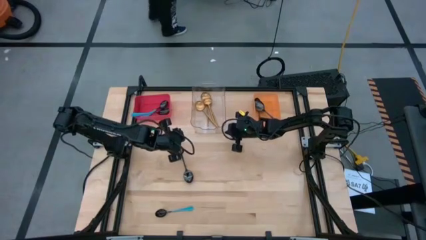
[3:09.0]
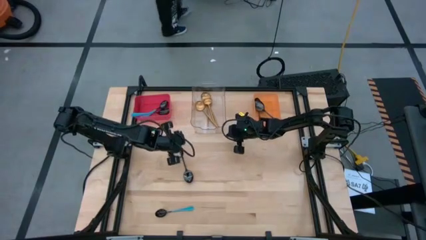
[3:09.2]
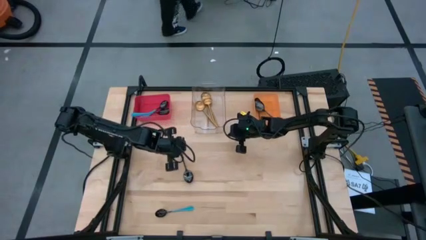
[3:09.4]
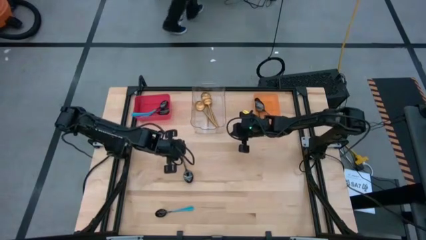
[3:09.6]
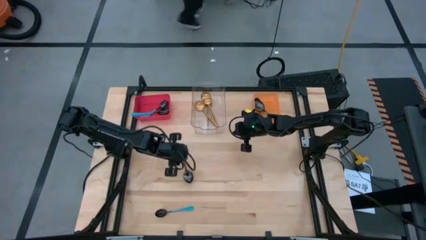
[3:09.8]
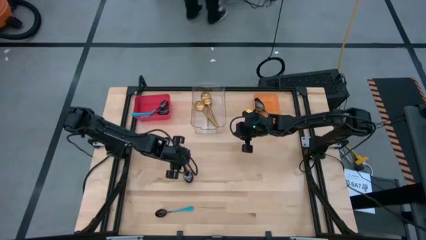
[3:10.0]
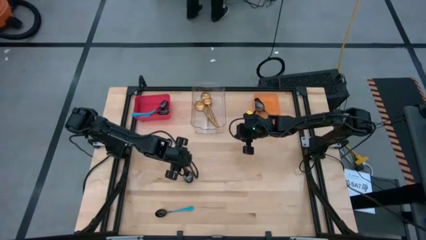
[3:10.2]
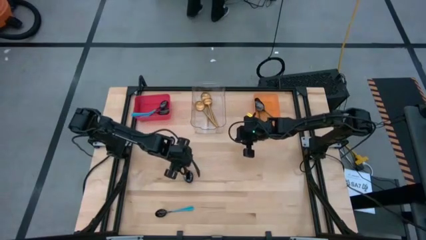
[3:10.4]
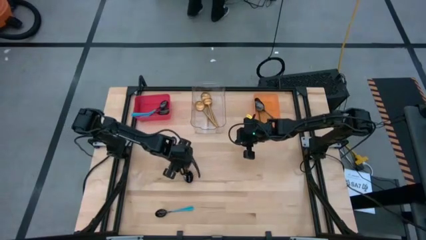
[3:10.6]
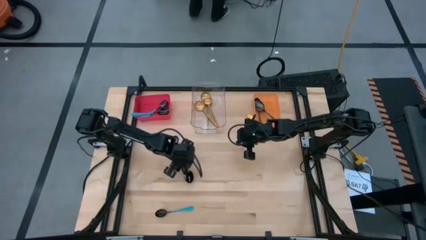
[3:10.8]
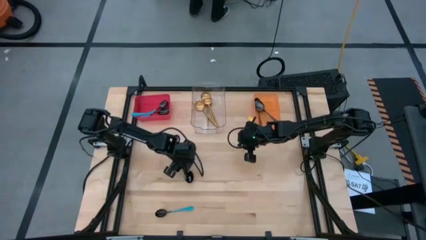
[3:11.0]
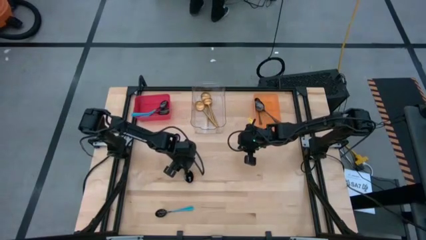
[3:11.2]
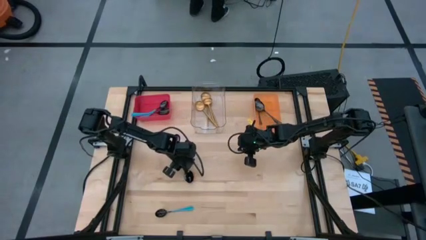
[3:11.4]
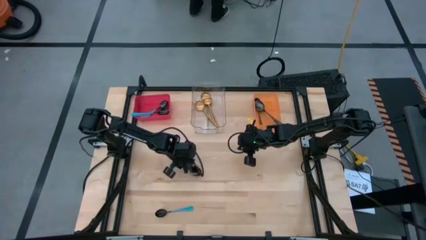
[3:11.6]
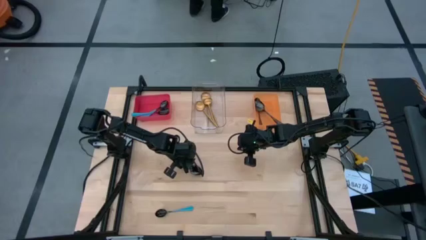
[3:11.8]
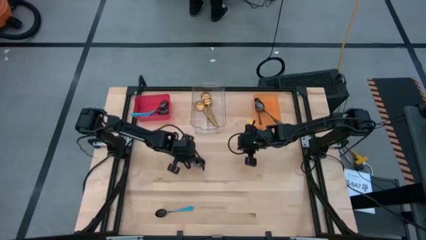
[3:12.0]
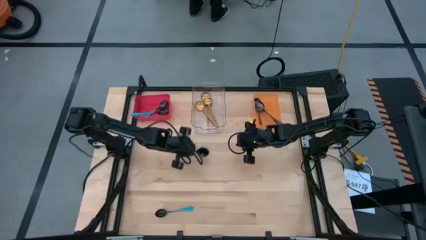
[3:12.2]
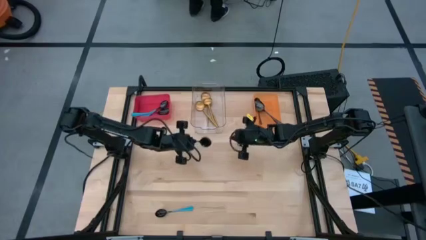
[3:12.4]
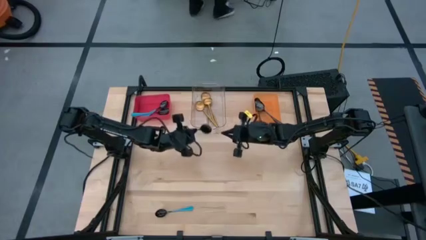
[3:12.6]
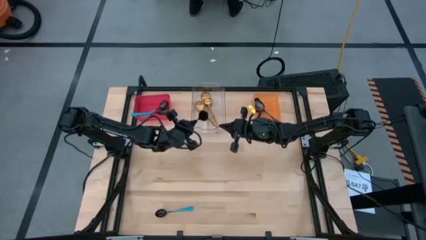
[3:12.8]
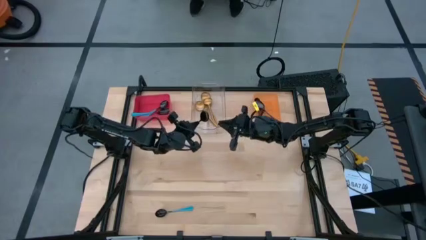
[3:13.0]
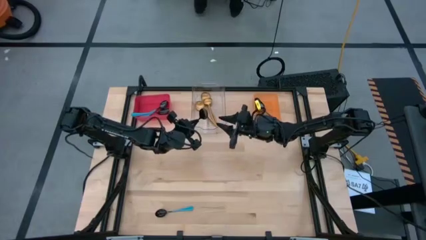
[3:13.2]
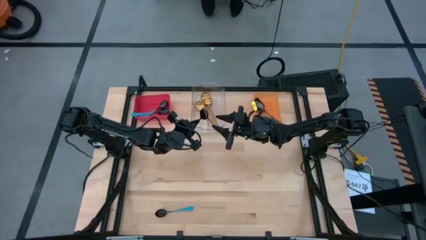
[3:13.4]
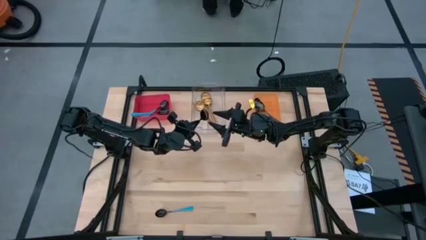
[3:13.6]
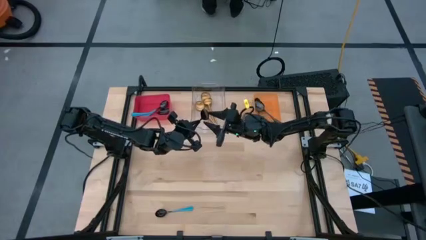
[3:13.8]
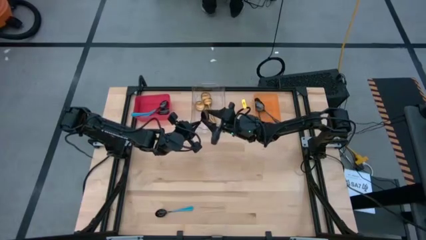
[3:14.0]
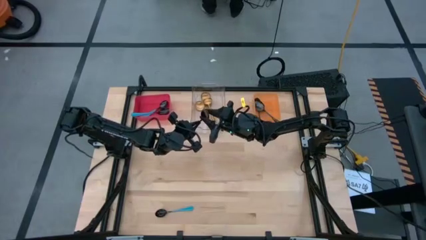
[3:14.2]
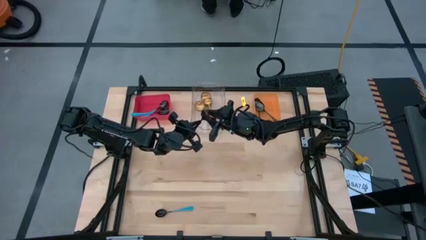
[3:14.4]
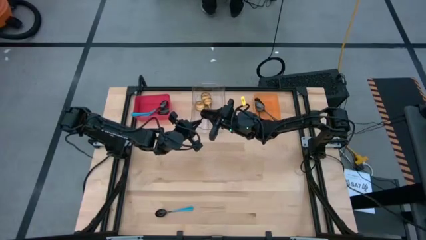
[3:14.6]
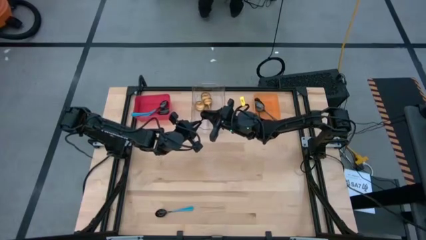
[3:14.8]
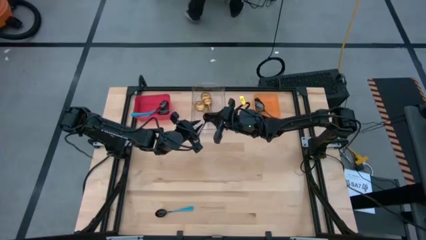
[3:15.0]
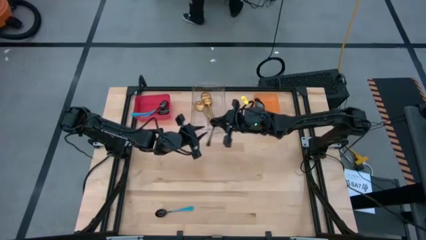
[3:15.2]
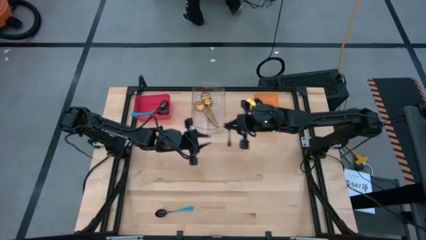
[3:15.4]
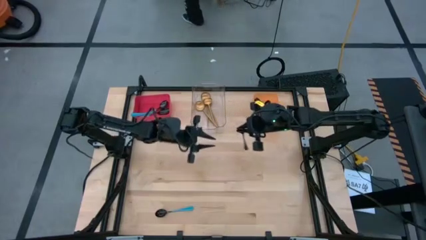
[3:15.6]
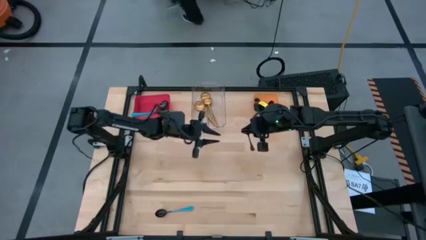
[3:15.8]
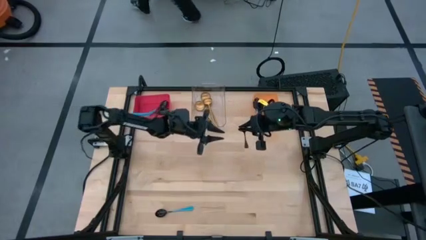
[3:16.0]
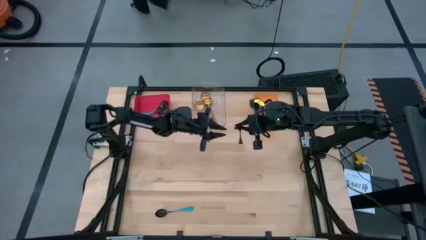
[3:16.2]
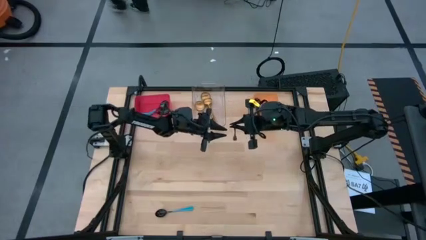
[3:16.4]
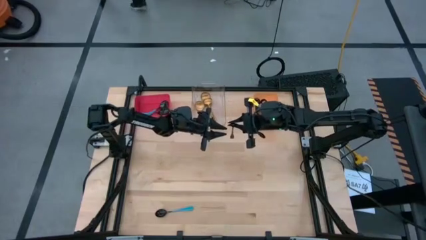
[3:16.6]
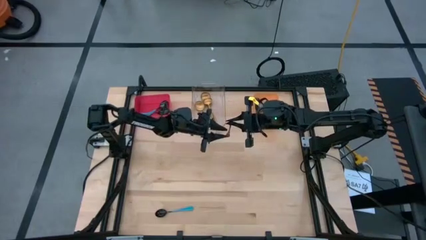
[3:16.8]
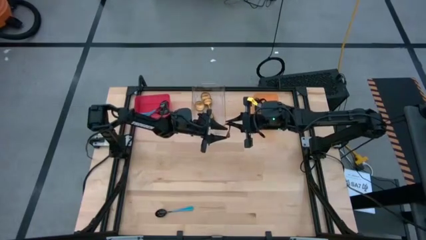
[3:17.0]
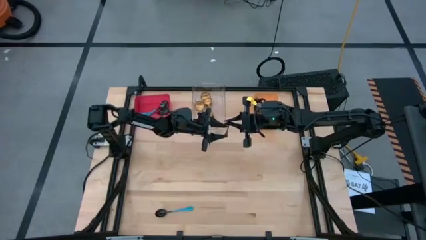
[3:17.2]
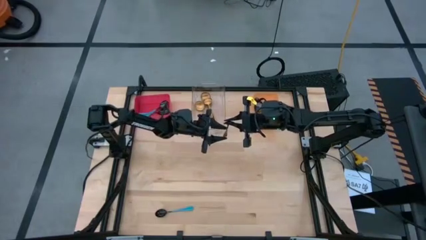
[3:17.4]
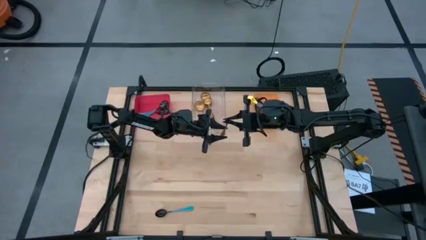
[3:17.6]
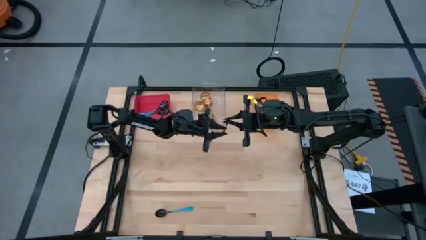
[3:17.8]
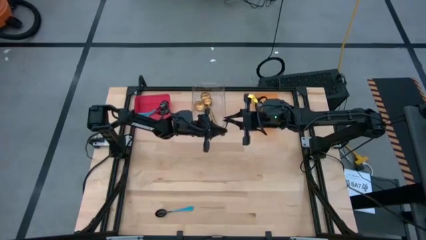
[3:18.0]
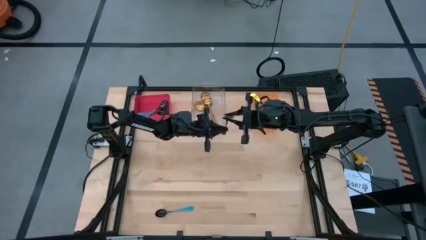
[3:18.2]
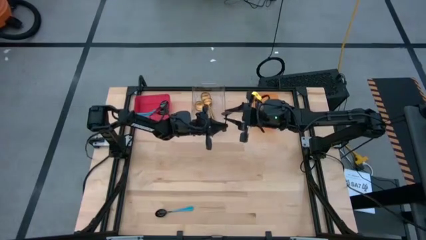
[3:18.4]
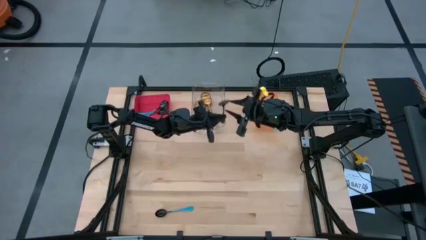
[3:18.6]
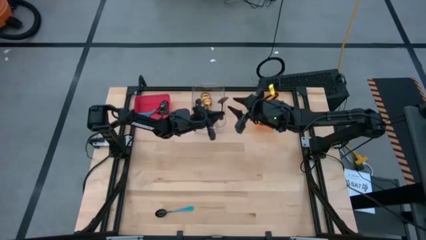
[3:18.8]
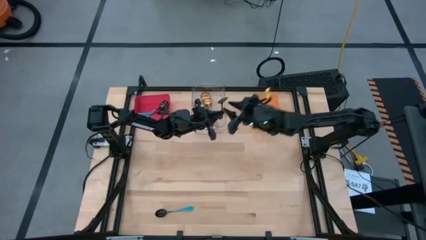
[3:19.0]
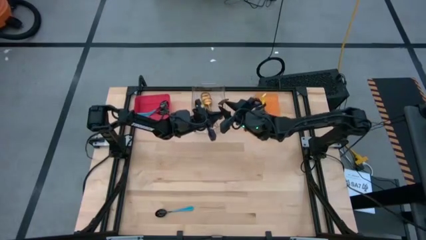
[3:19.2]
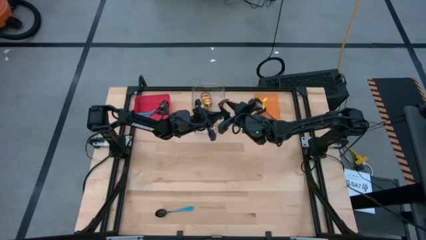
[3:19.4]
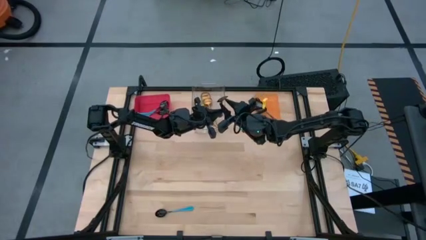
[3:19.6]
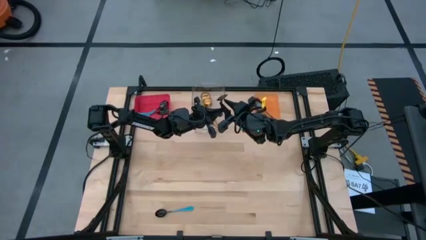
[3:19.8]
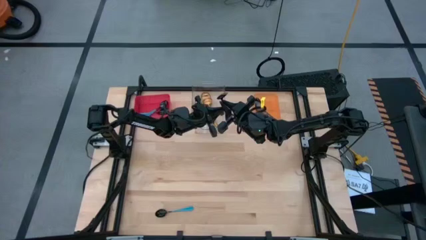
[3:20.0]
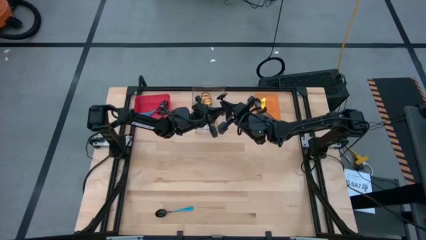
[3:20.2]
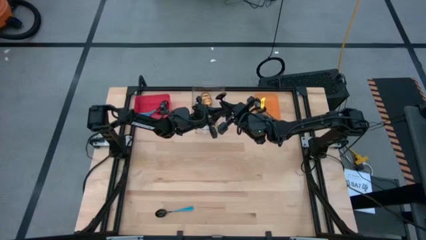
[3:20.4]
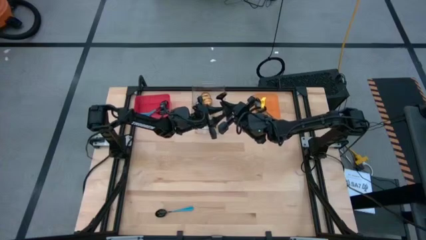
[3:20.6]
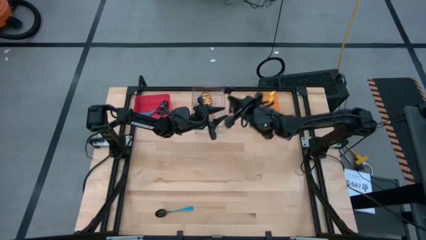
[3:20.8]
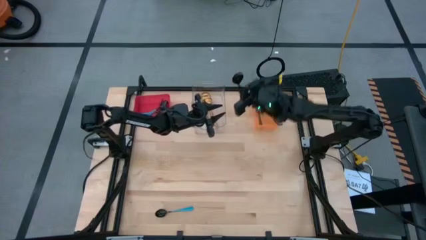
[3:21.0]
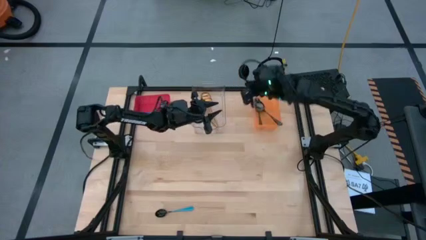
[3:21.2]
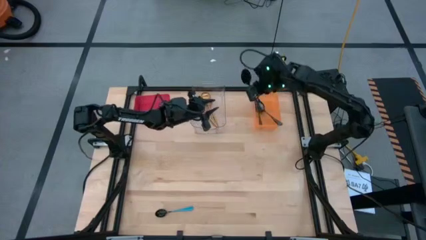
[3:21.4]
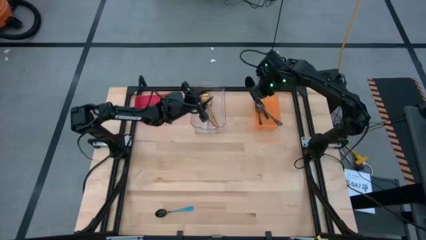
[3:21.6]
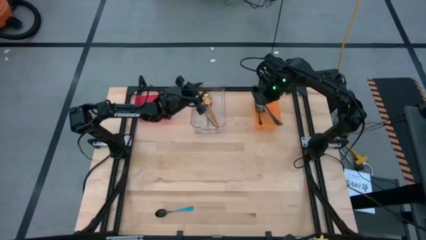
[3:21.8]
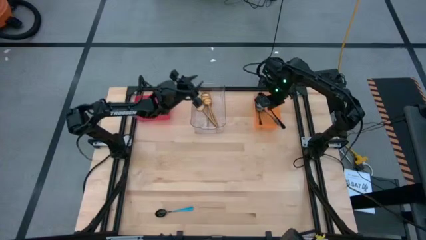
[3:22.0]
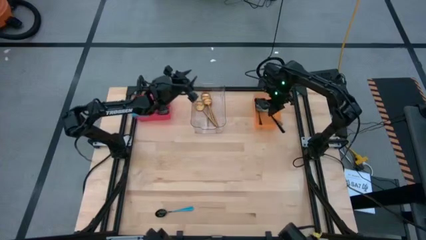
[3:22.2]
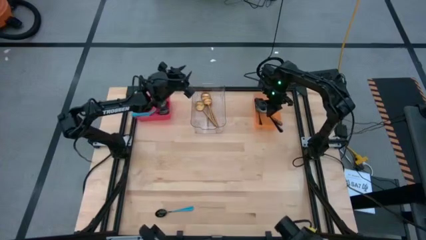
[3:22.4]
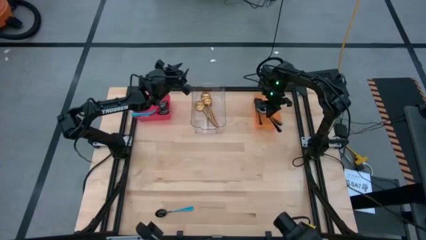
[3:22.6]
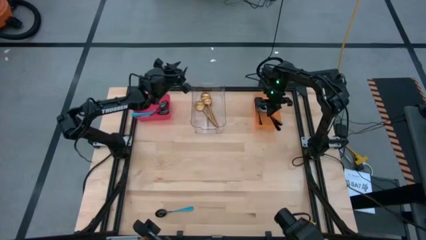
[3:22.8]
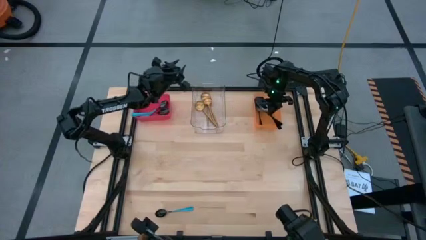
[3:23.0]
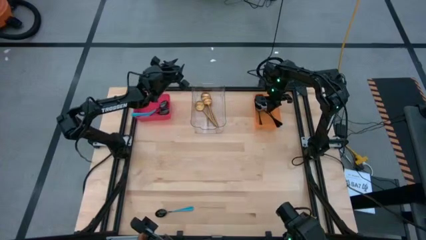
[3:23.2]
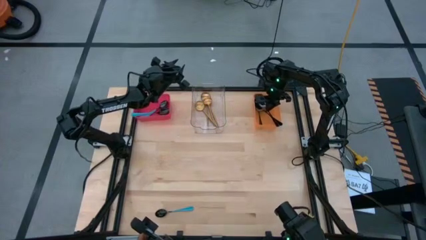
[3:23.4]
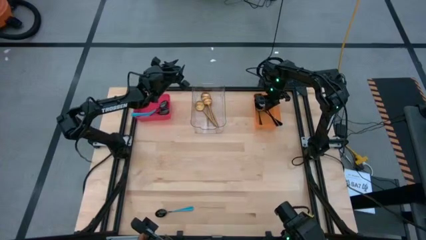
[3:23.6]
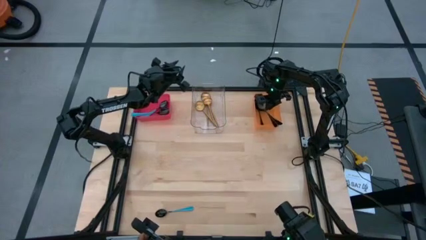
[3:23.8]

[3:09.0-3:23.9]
Task: Sort silverware by color (type)
Put the black spoon into the orange bin

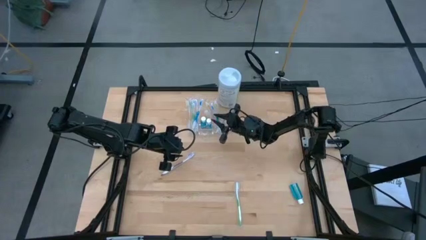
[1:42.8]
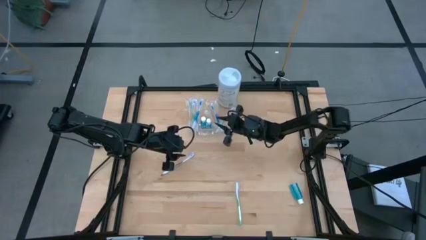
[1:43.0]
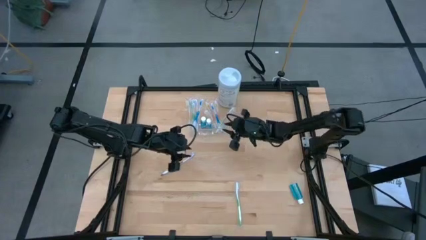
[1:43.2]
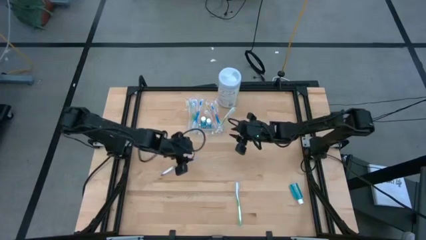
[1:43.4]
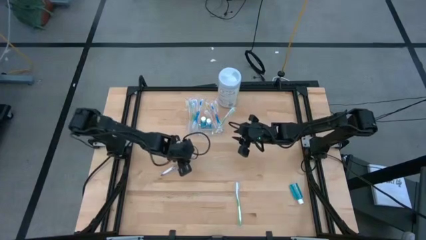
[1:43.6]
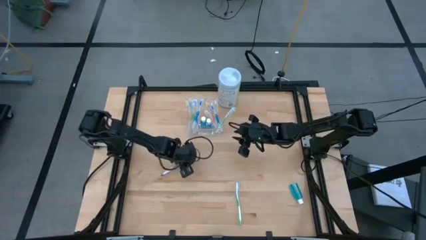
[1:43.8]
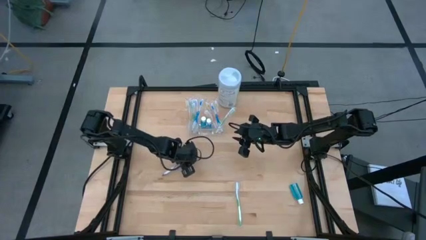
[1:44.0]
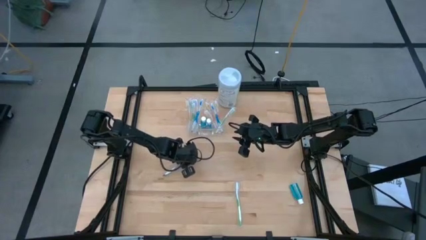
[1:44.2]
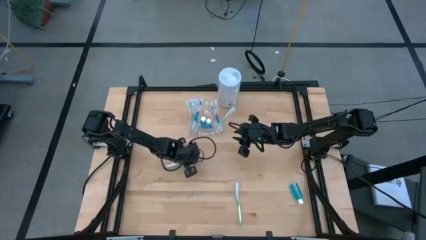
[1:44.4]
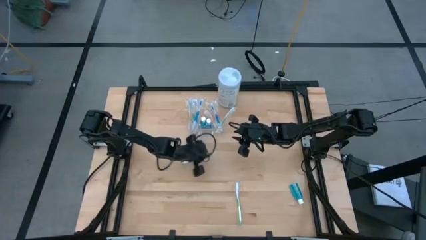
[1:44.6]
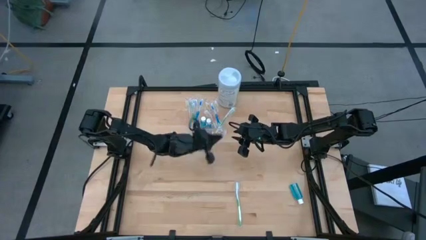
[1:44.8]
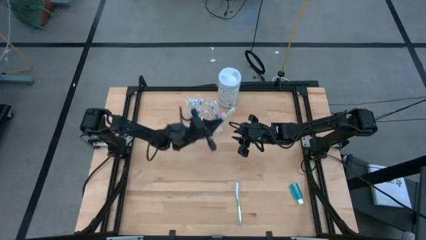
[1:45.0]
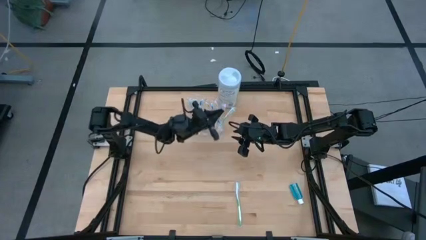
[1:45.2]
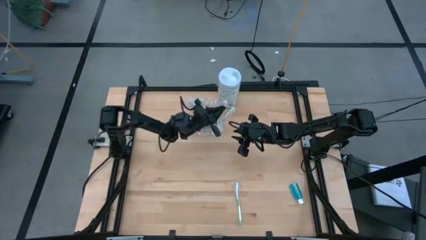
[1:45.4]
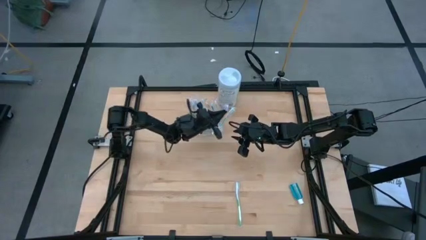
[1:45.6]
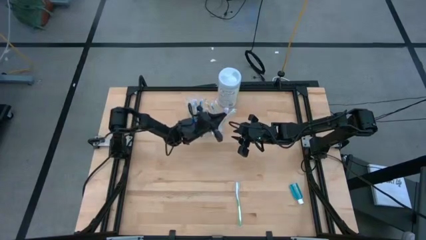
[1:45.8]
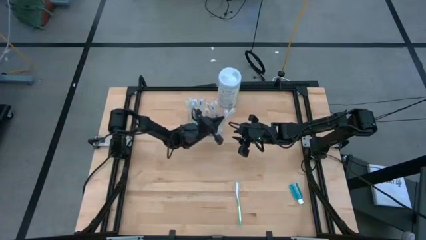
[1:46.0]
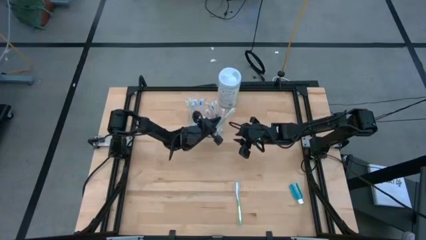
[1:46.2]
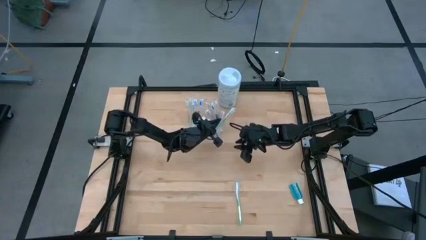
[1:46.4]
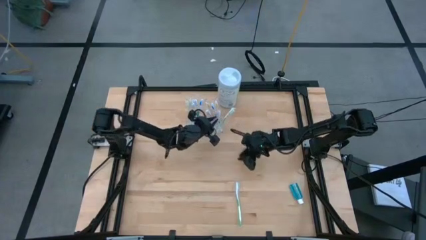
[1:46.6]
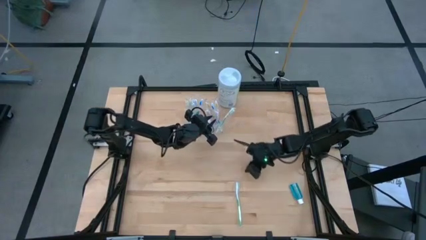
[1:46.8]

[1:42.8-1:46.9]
Task: Pick & Place toothbrushing station
Put the purple toothbrush into the transparent organizer
